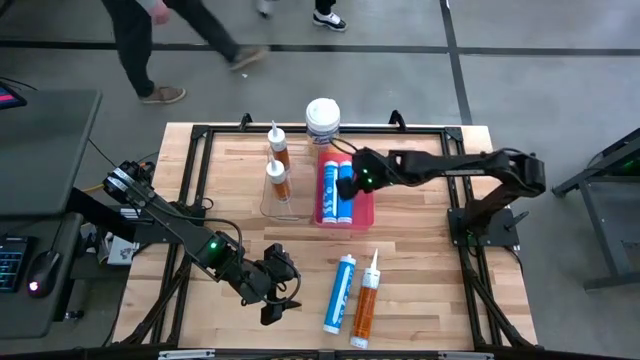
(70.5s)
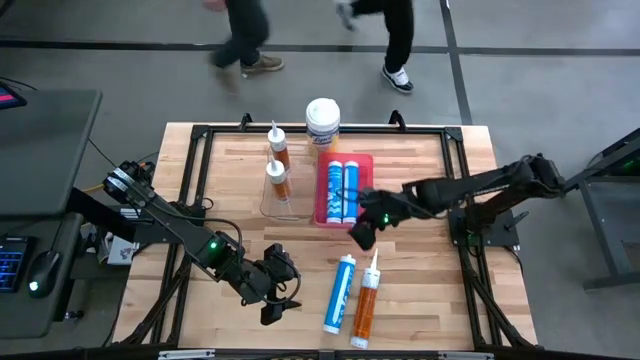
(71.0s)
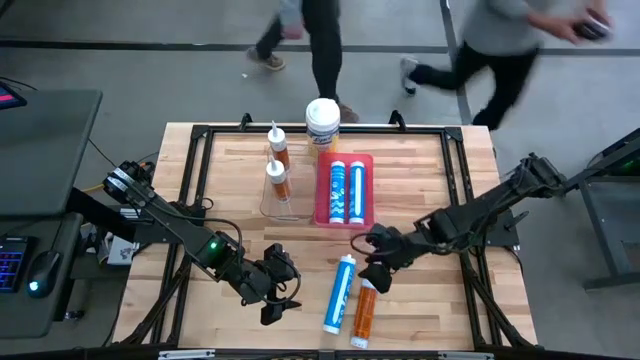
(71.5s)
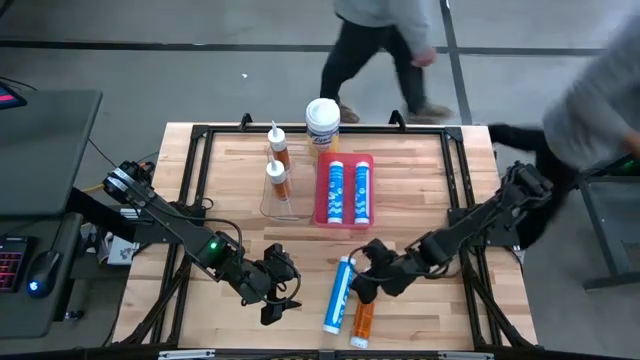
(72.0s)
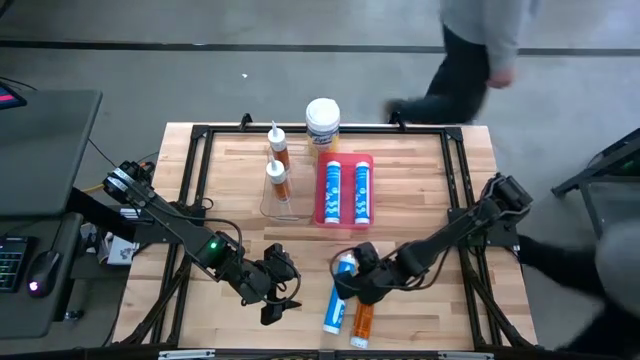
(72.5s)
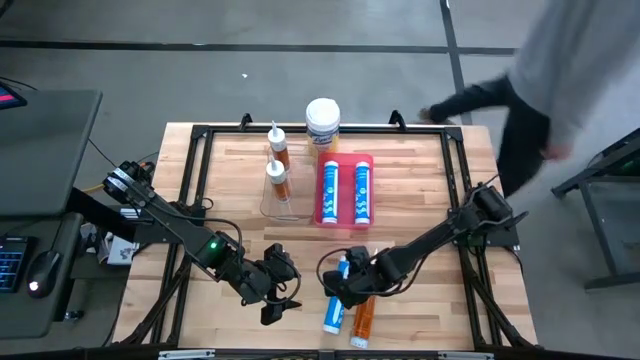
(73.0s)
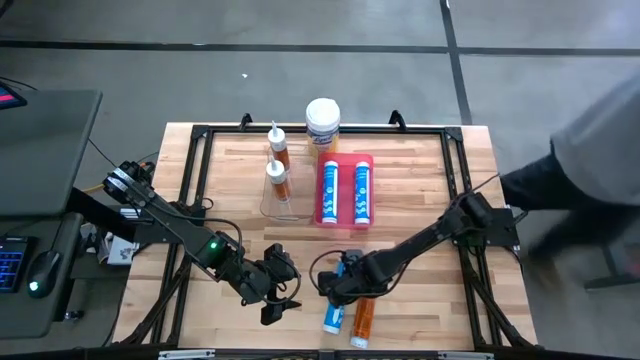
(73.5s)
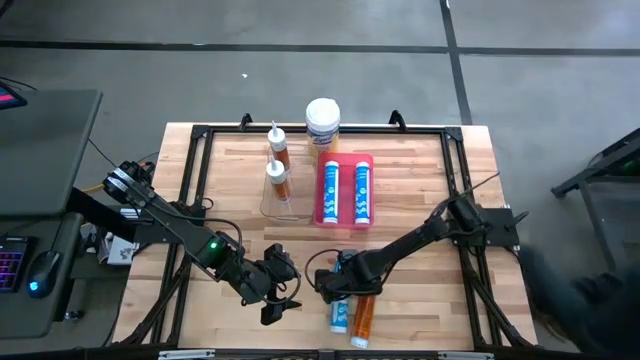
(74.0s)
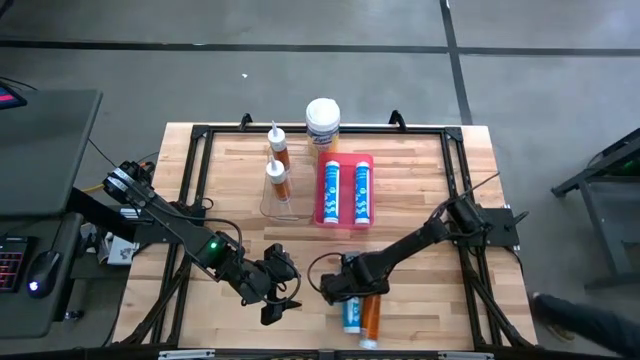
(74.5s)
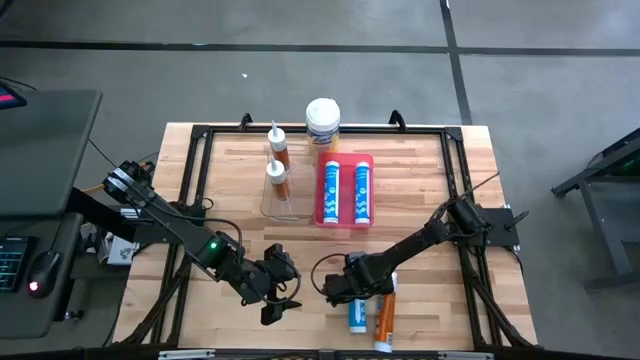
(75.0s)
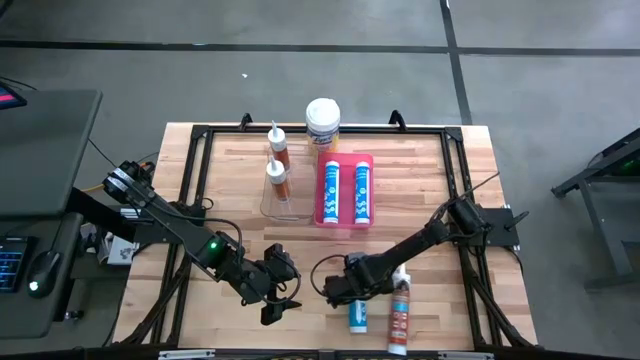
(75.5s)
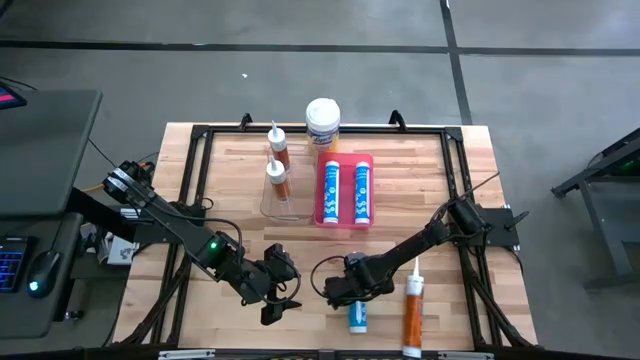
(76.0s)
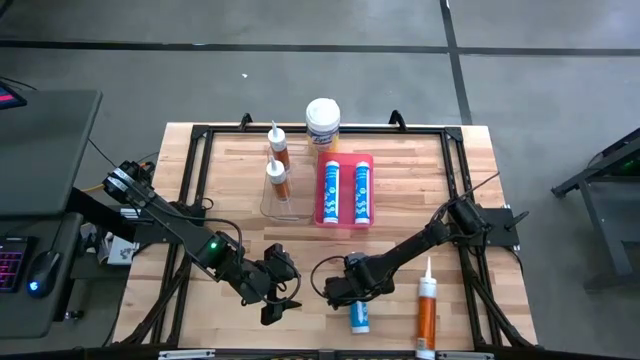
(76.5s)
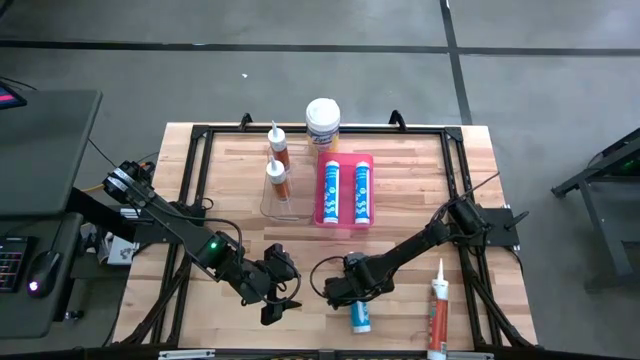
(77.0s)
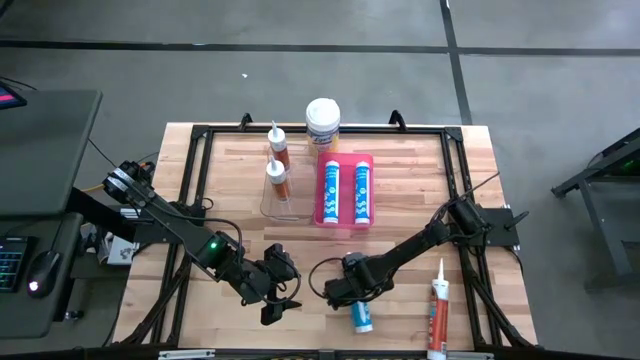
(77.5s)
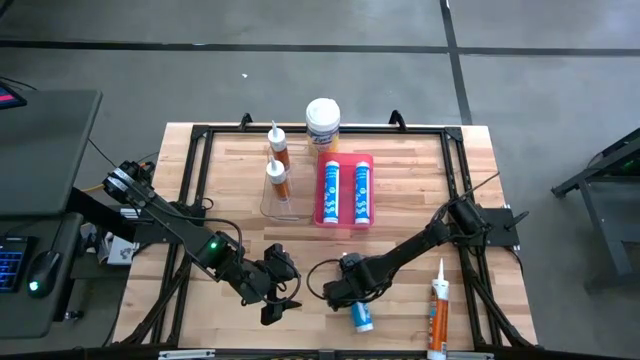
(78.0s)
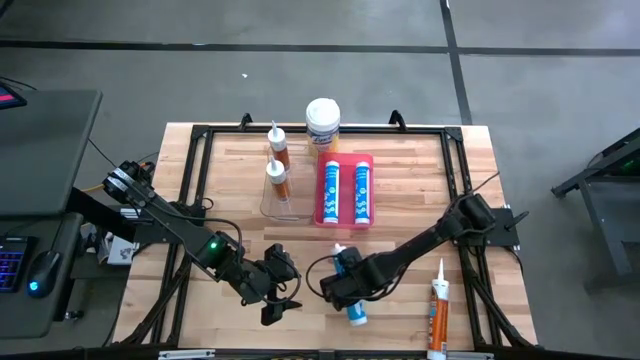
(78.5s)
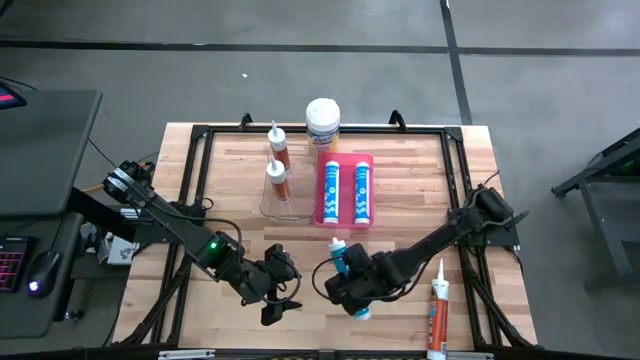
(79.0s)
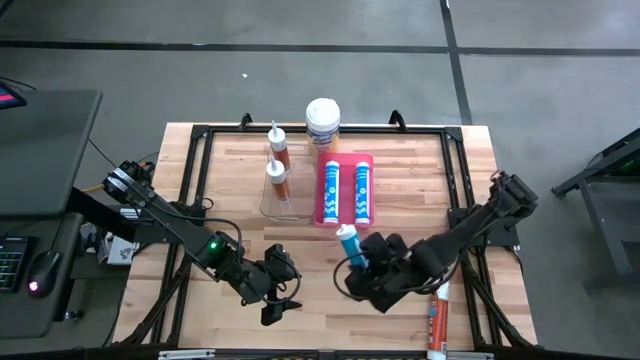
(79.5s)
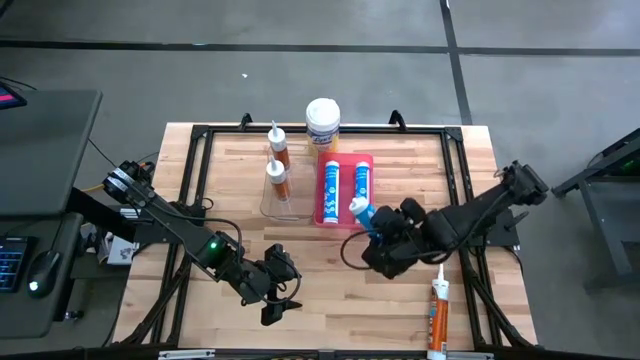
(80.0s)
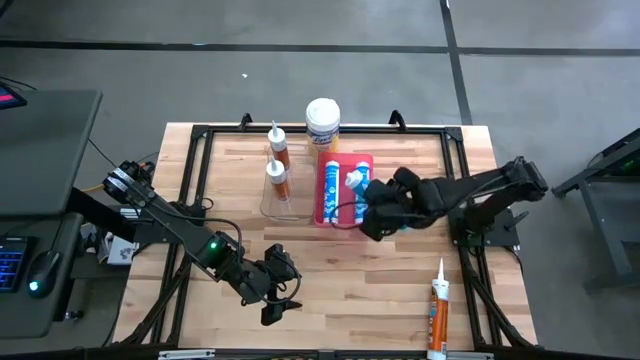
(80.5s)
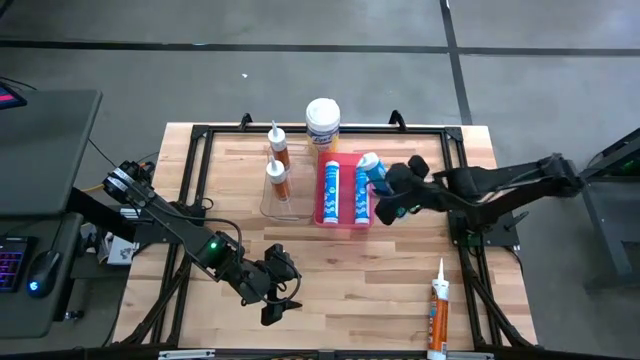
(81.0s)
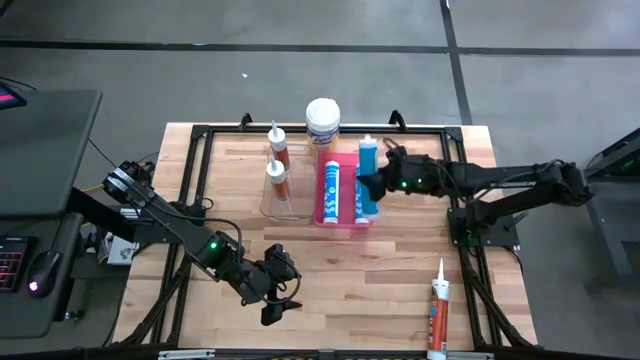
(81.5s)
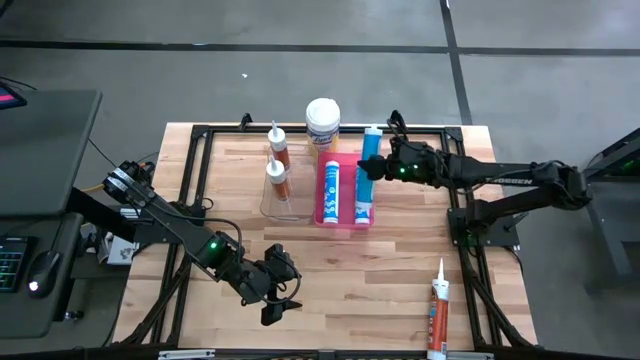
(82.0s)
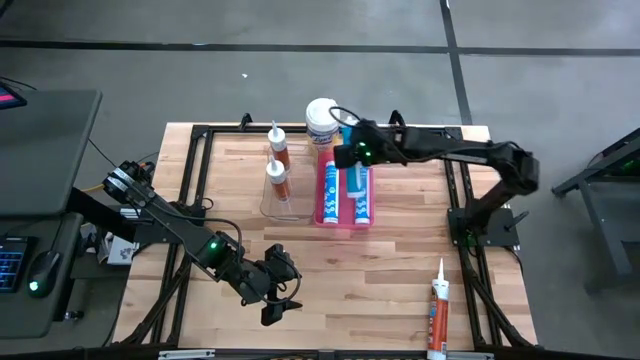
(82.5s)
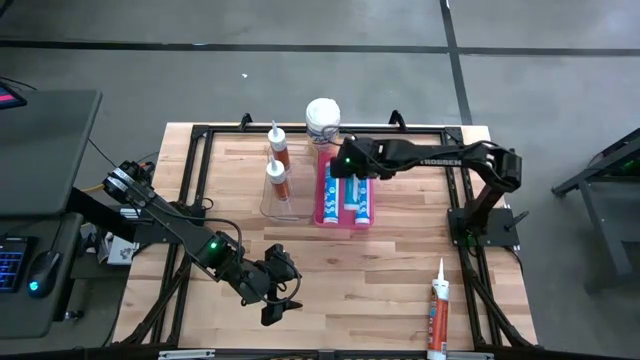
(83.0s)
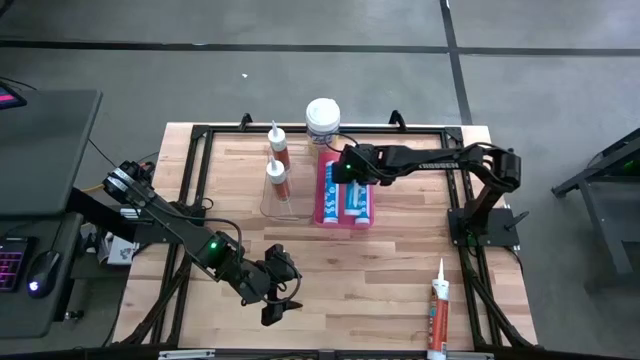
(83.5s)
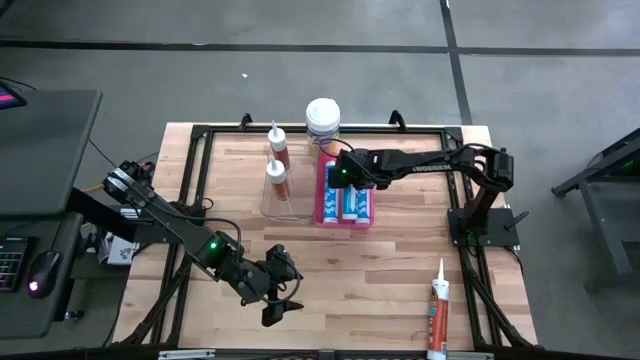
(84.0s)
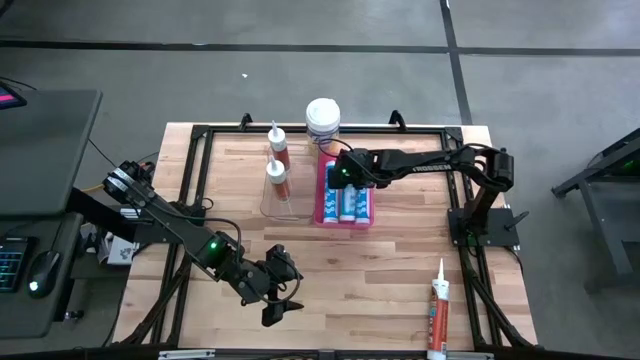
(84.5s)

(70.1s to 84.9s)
Task: Pick & place silicon tubes, Sealant and Lysol wipes
Put the blue sealant into the pink container

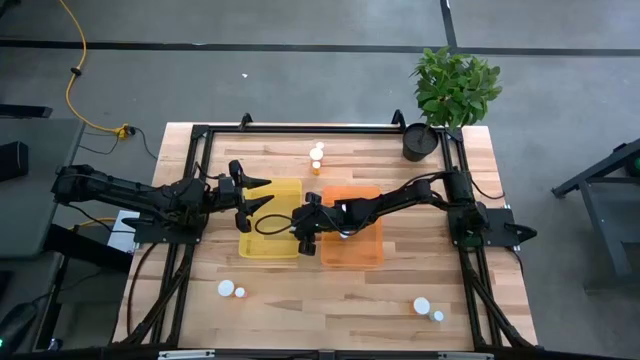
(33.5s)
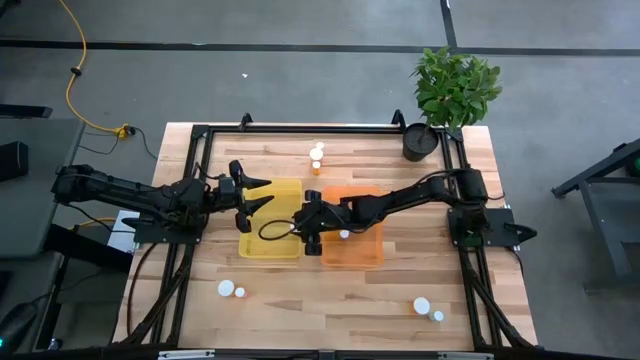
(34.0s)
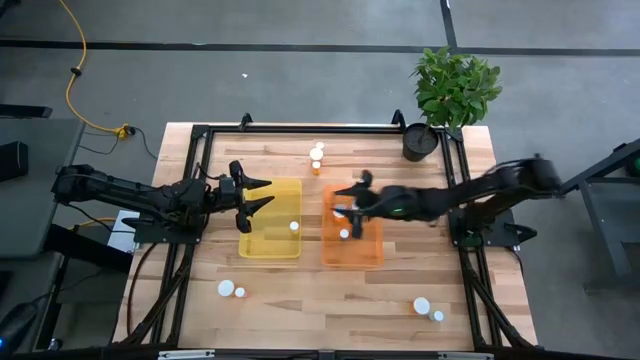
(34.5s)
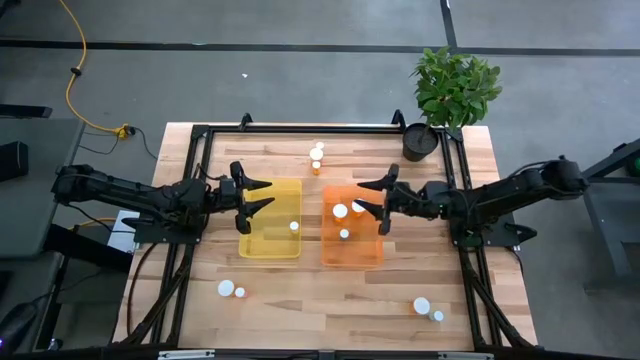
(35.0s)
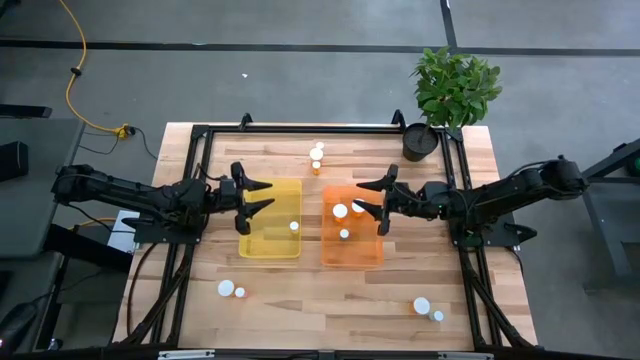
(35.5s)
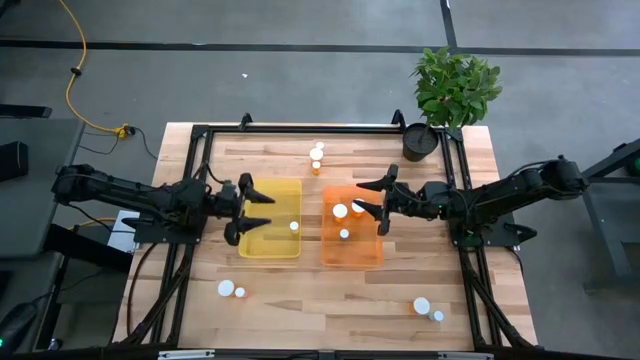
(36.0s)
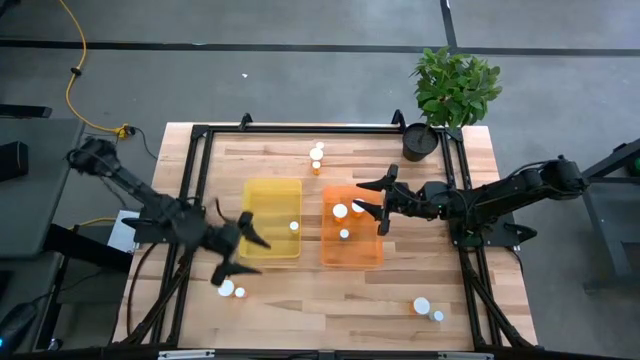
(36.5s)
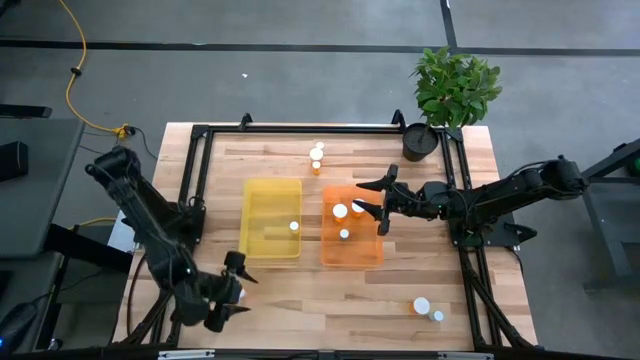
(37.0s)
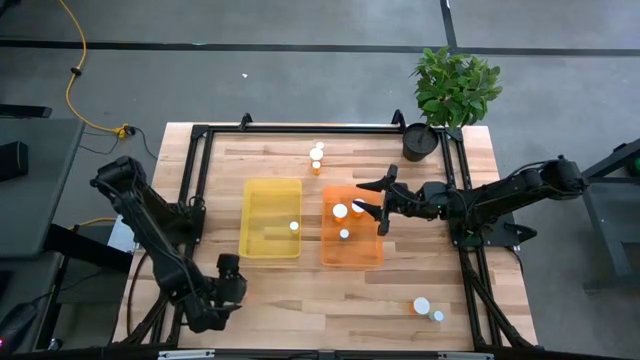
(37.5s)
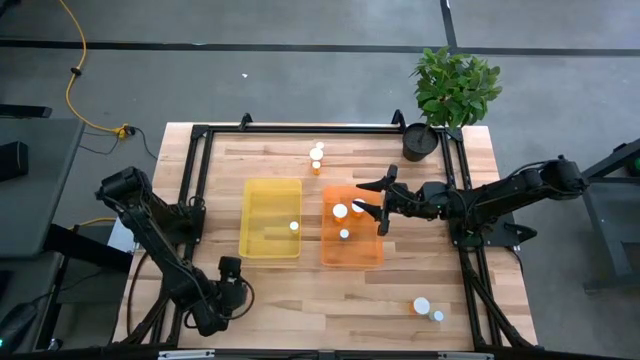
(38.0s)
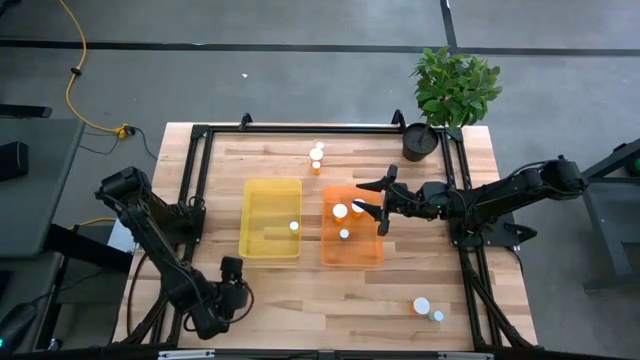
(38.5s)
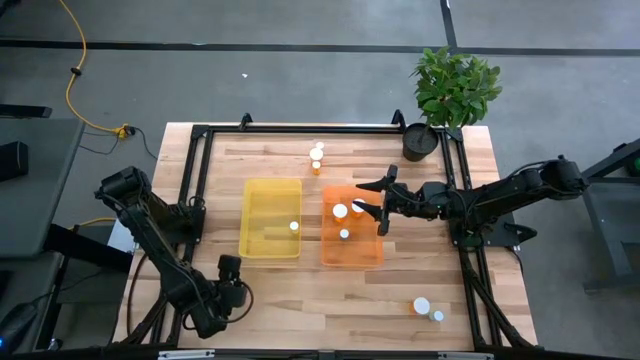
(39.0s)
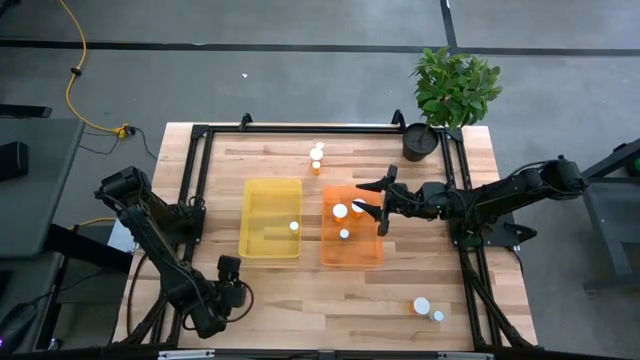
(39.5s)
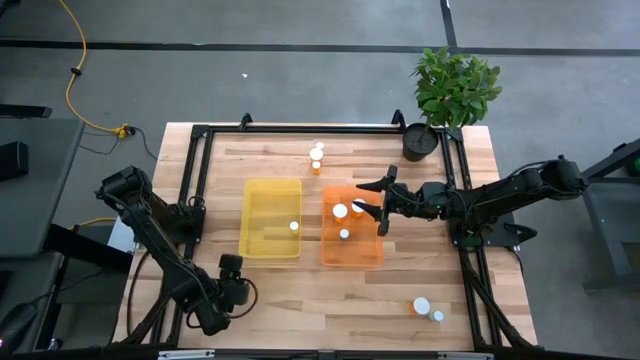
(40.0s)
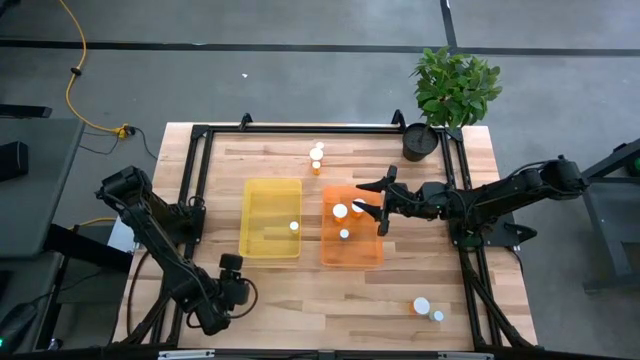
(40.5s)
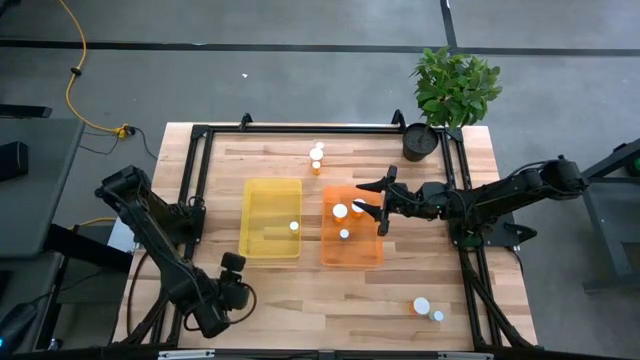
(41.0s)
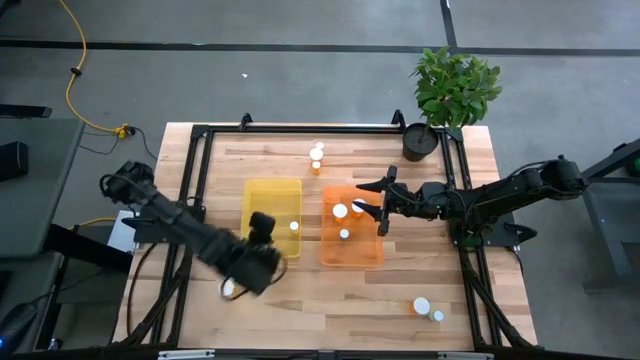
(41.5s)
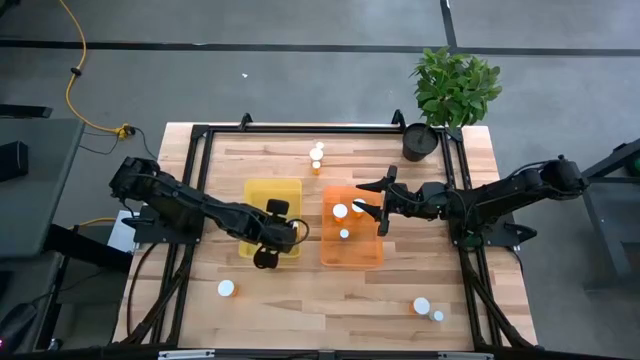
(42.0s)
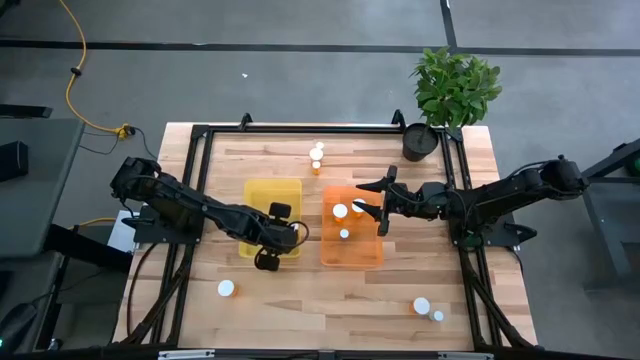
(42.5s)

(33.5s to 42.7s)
Task: Pick and place medicine bottles into bin by pill shape (circle, oval)
Put the yellow bottle pill into the yellow bin
